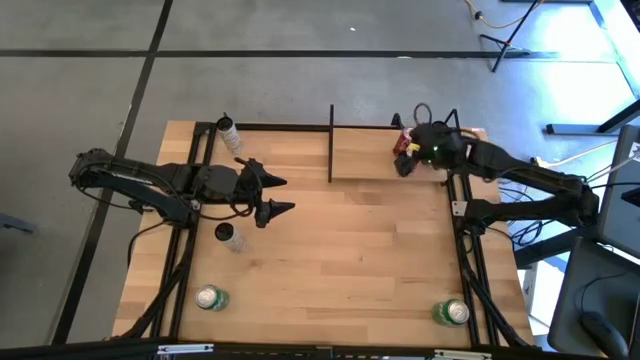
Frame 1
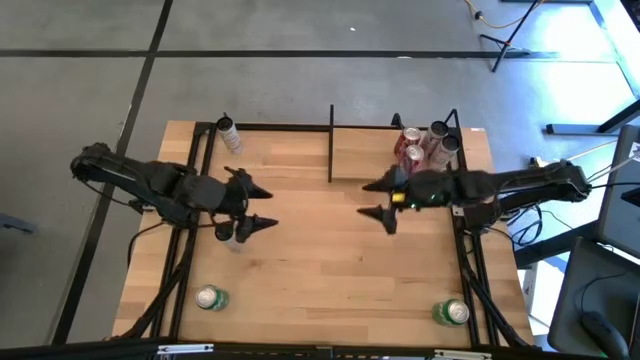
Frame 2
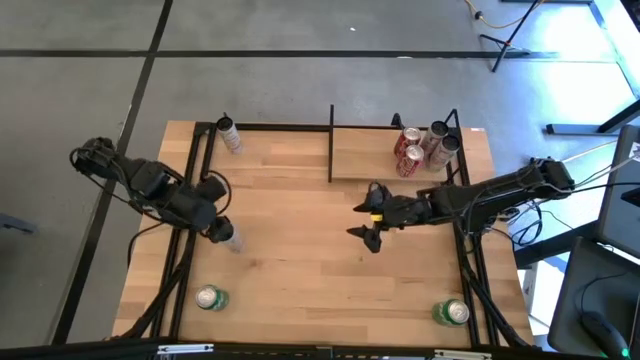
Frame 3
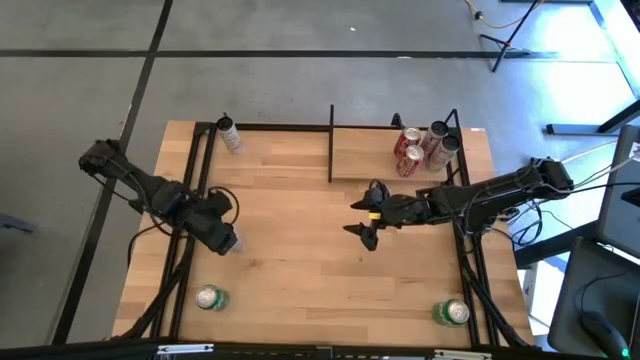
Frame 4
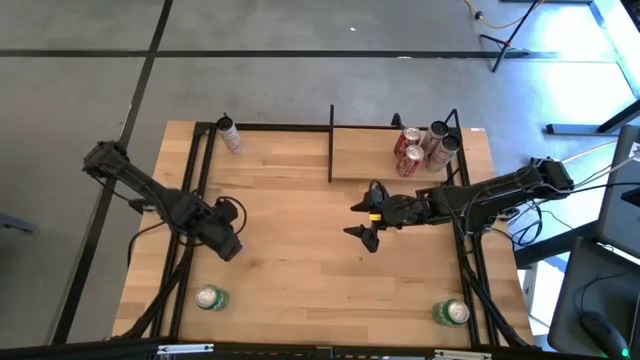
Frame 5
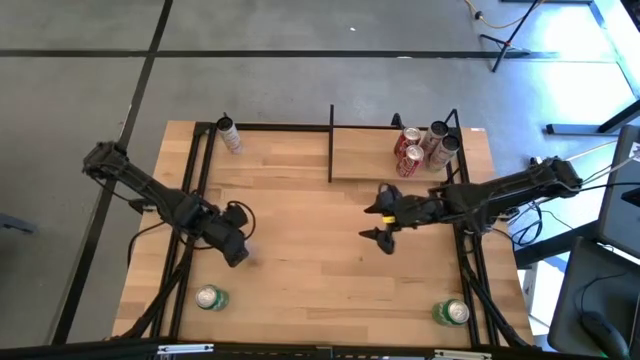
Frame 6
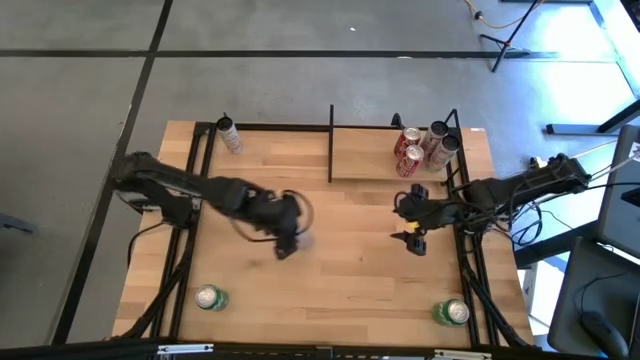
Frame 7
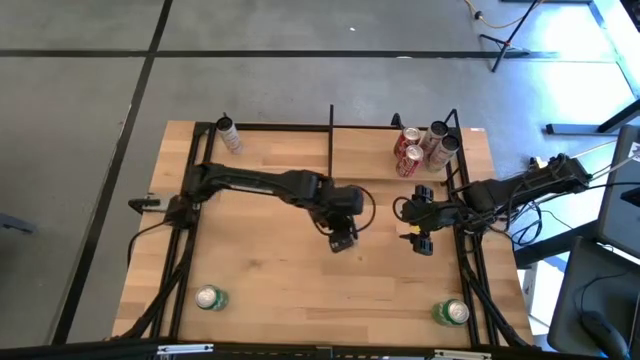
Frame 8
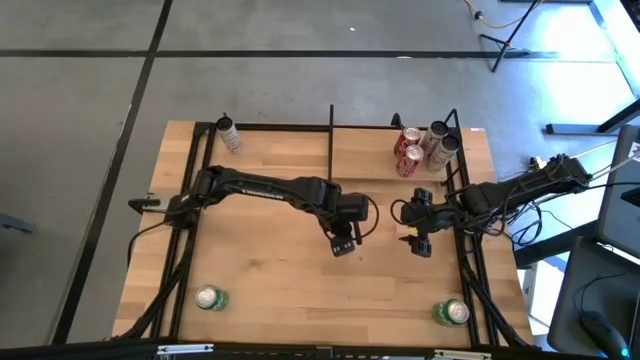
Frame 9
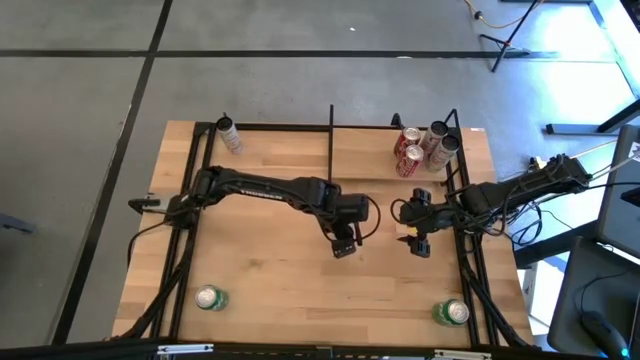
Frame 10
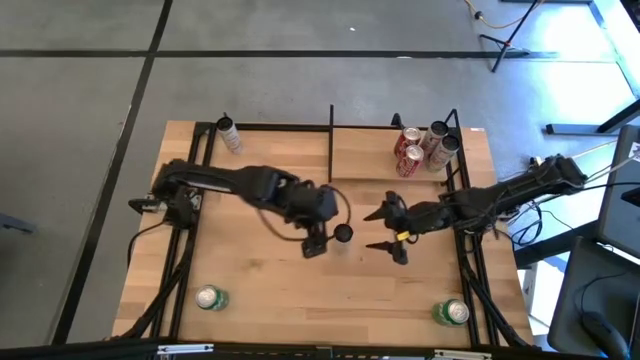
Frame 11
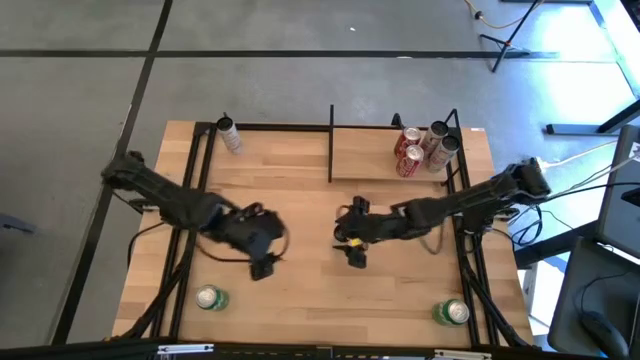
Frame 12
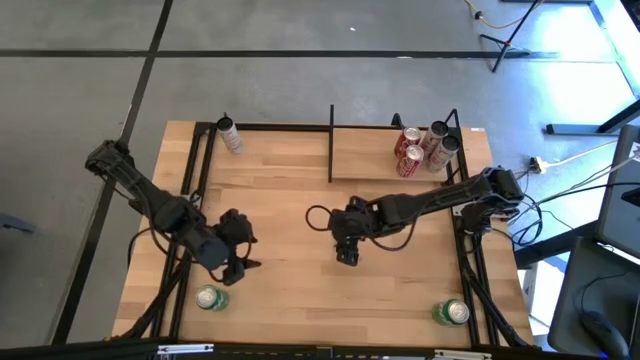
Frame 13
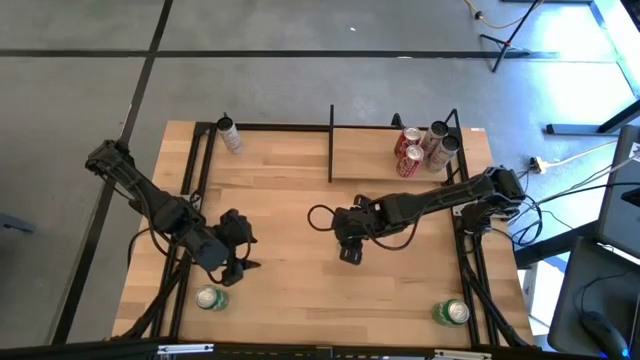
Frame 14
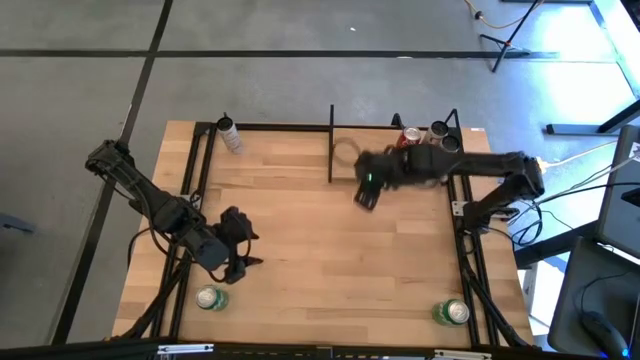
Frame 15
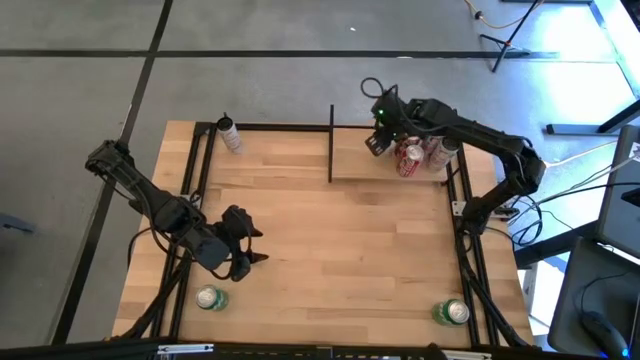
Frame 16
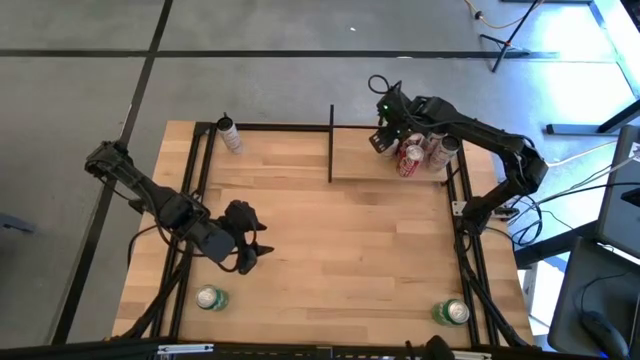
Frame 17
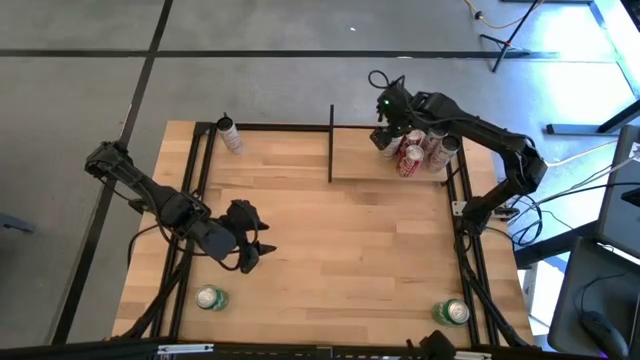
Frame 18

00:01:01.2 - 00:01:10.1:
Task: Place canned beverage on shelf
Put the bottom white-yellow soda can on the shelf

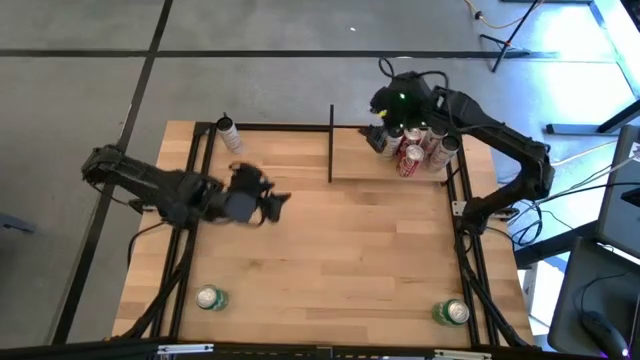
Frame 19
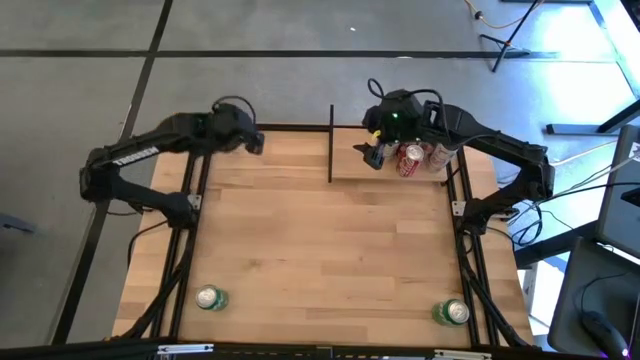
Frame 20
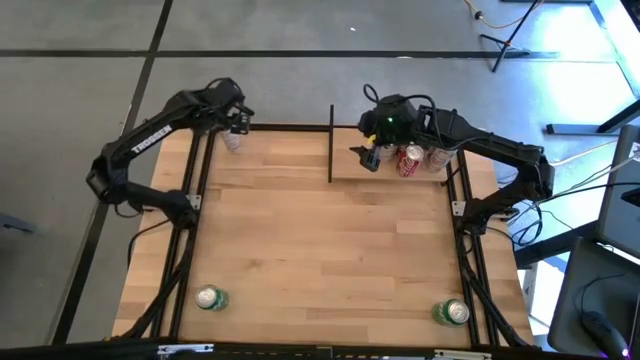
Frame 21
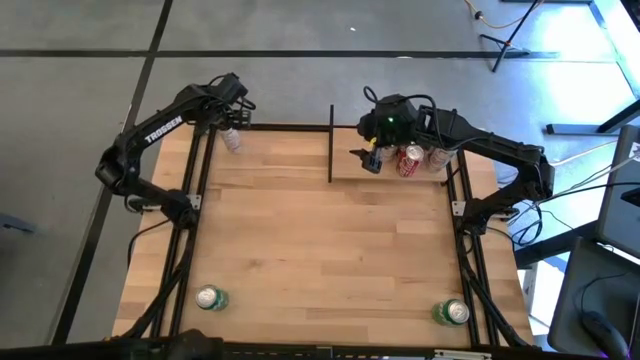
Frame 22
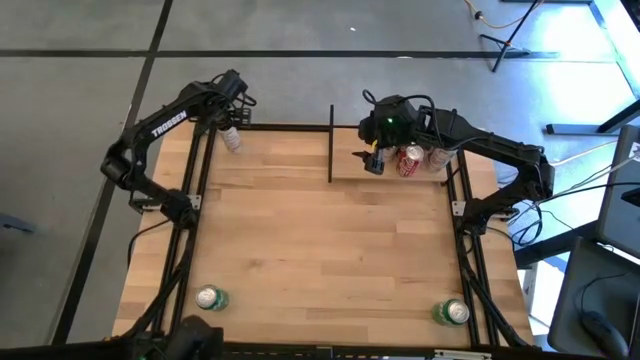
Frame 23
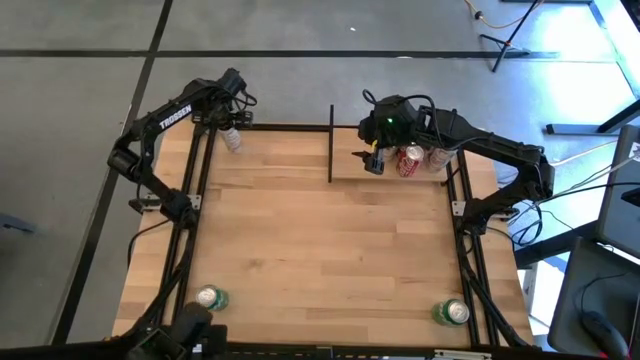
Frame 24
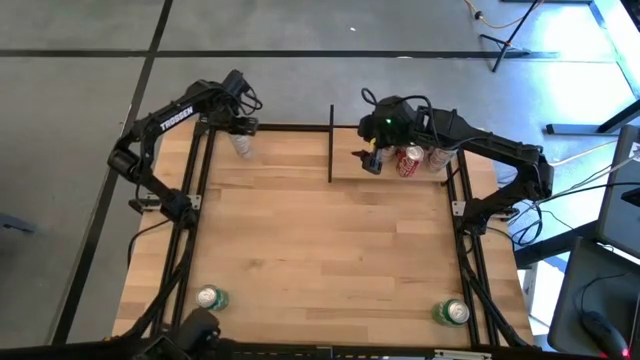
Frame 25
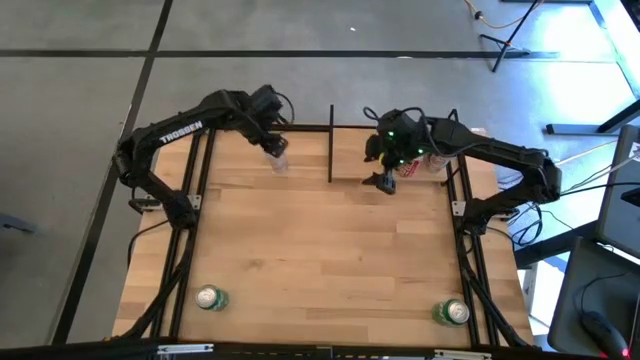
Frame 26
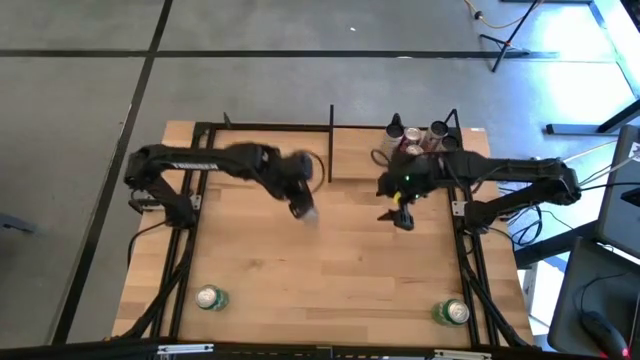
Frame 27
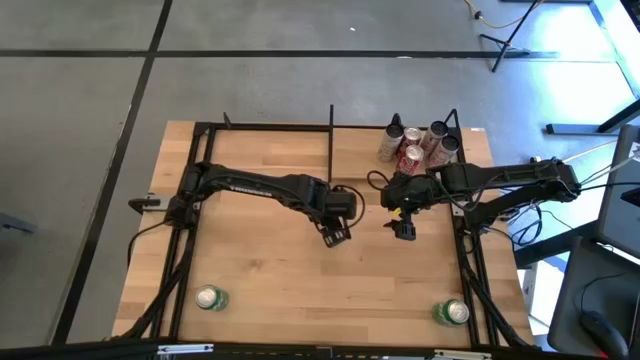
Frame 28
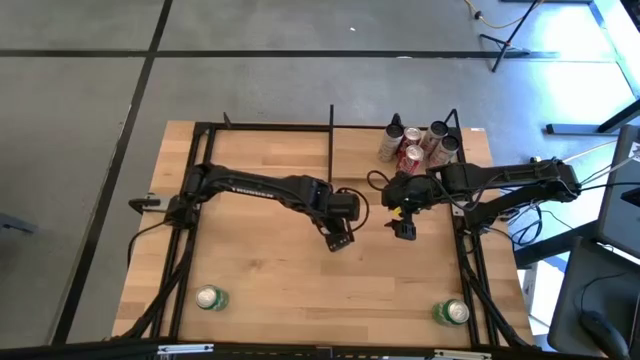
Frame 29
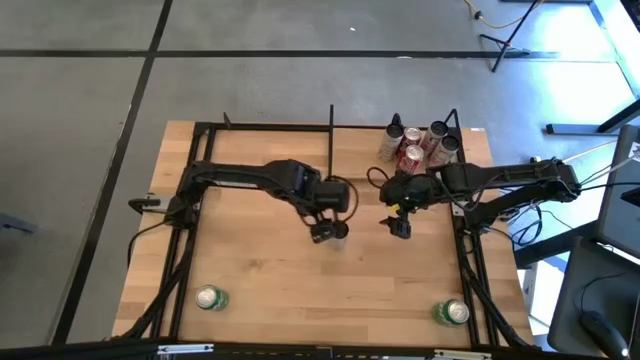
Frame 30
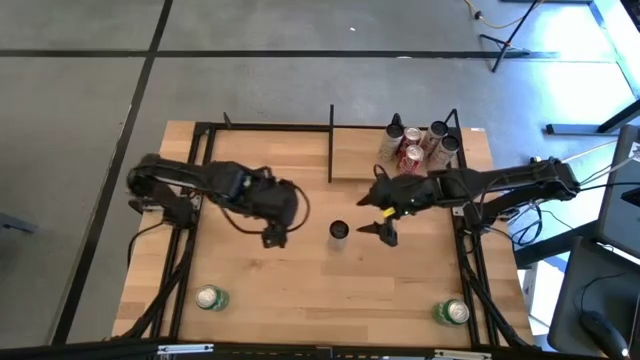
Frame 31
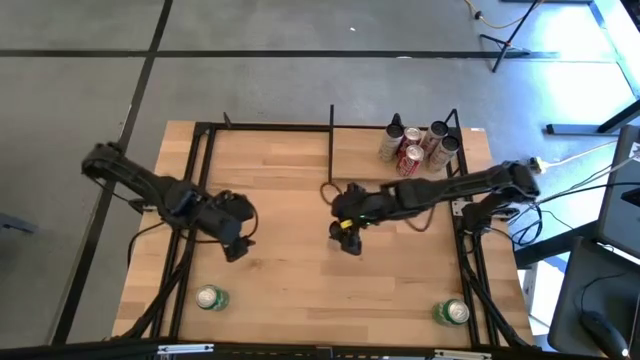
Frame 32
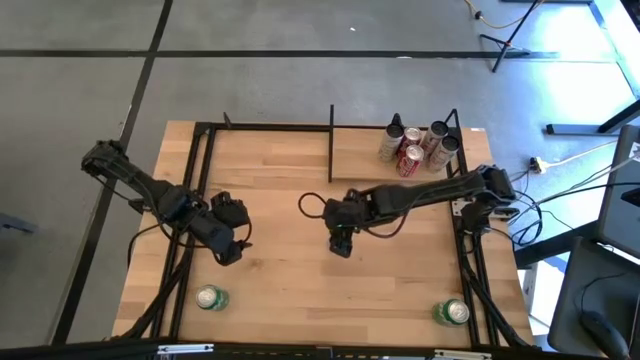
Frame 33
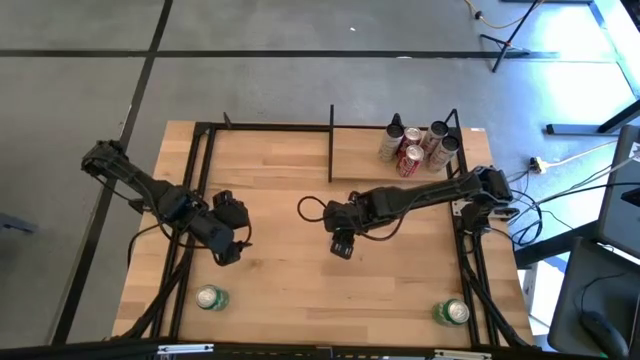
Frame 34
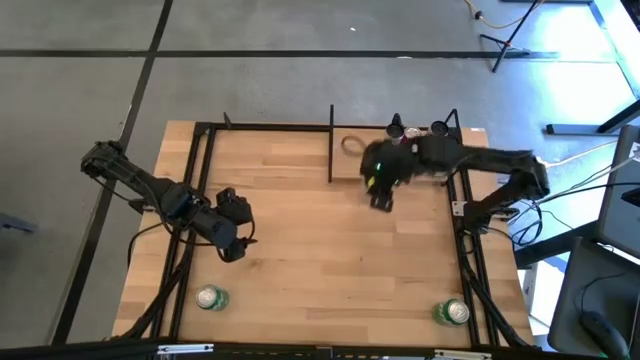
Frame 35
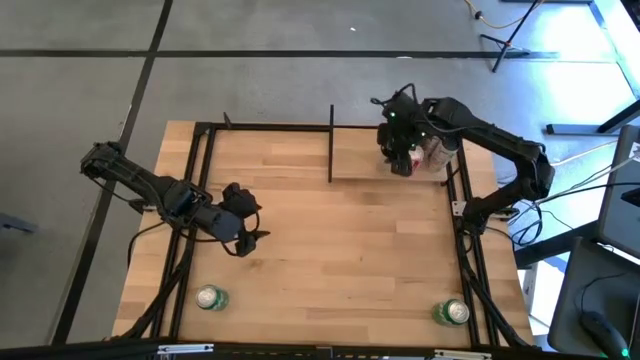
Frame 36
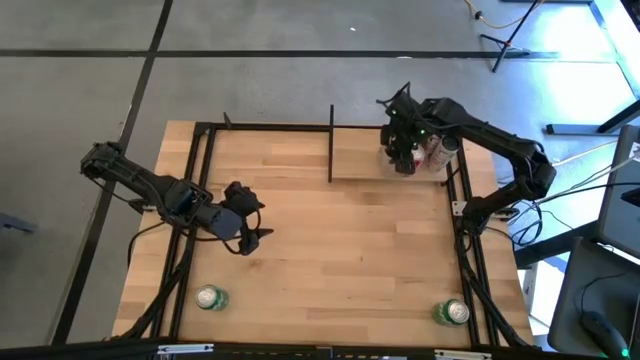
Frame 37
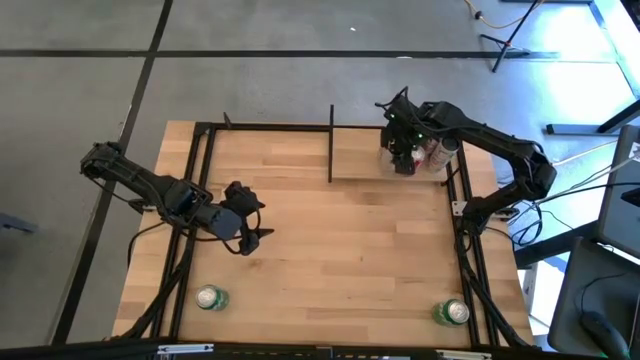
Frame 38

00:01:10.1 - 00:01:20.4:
Put the white-yellow soda can on the shelf aligned with the other white-yellow soda can

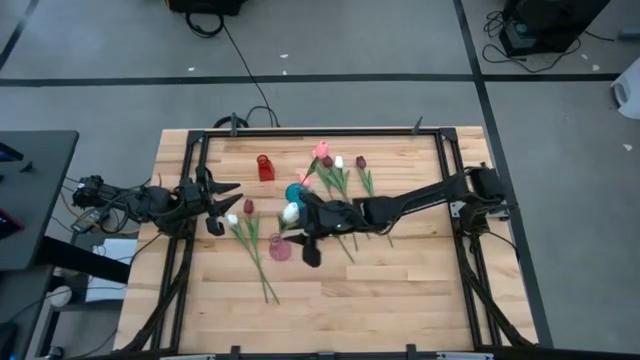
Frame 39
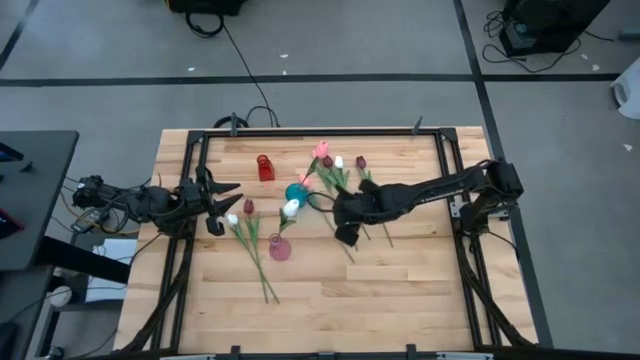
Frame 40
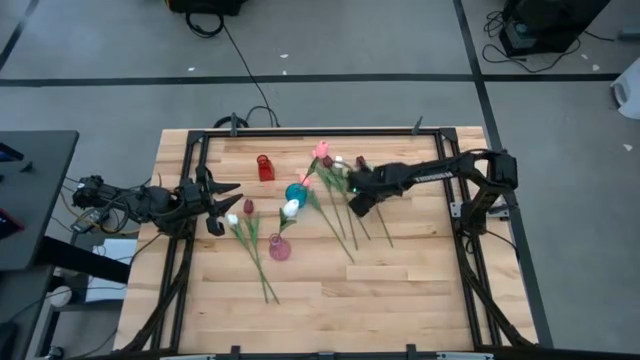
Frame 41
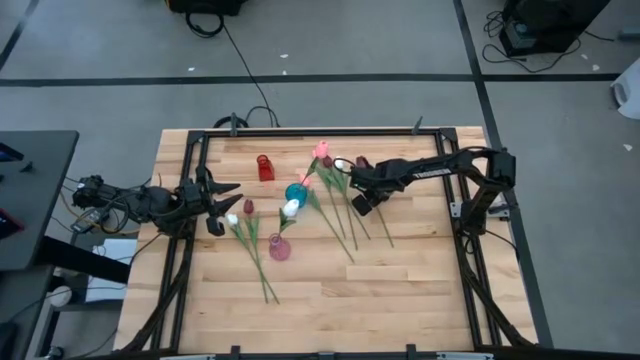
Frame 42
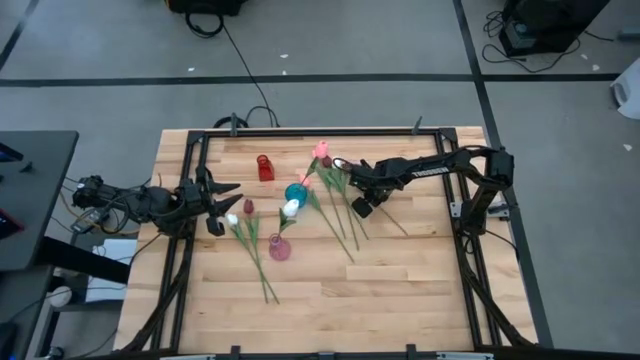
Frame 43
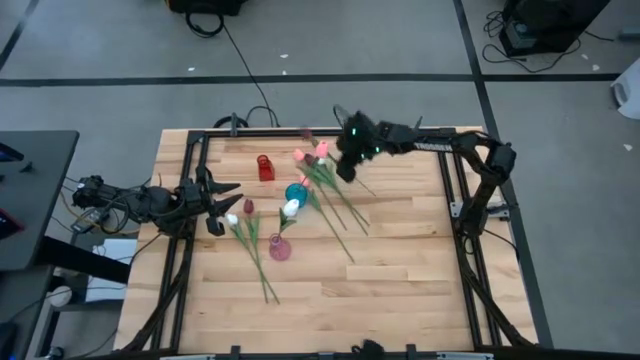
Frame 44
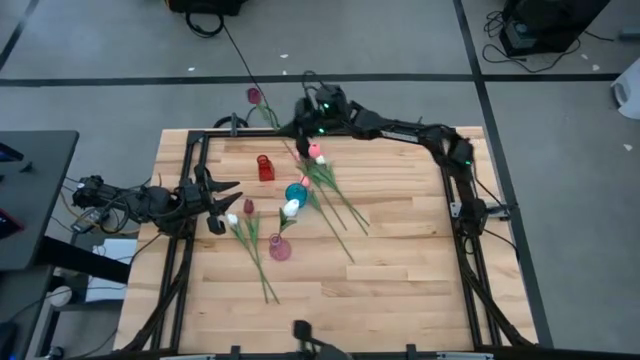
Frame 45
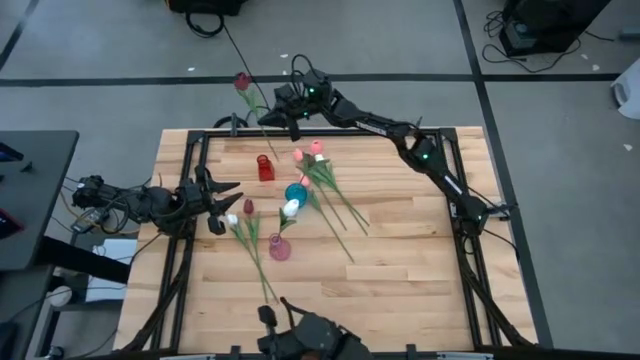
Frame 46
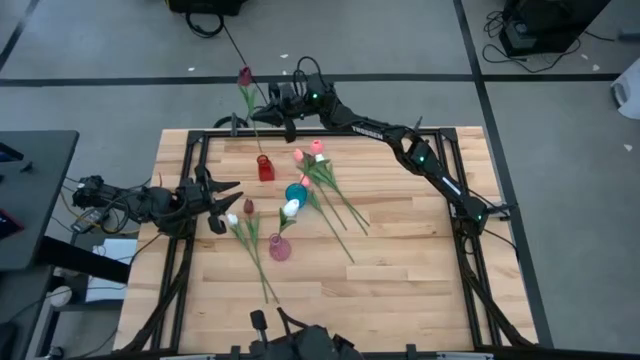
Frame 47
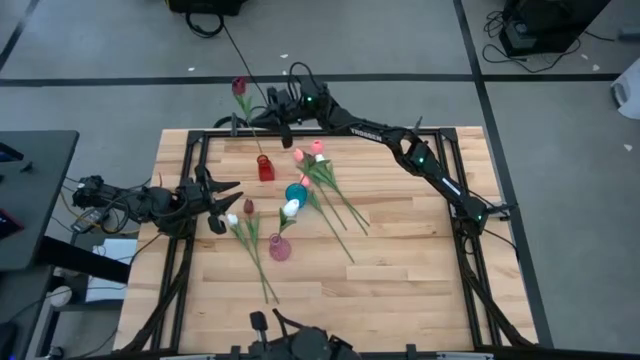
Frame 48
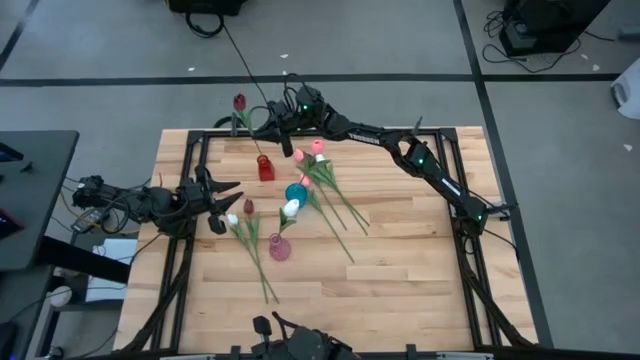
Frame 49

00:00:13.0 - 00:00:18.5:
Task: Sort flowers into vase by color
Put the top right red tulip into the red vase
